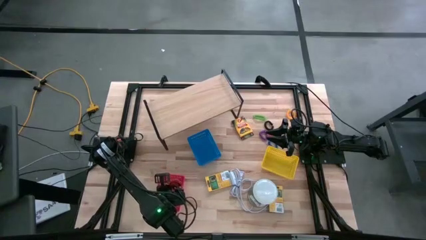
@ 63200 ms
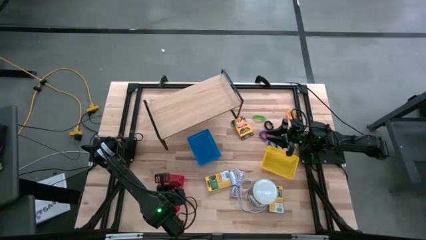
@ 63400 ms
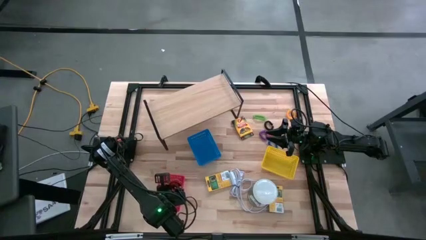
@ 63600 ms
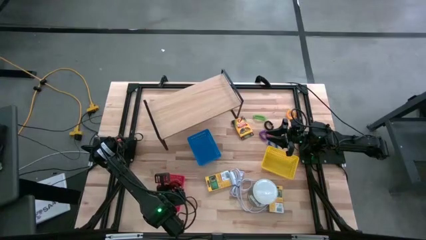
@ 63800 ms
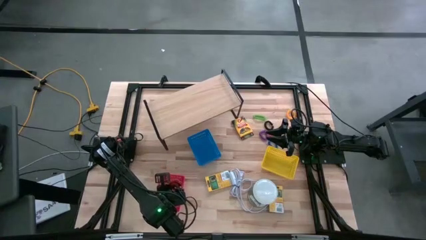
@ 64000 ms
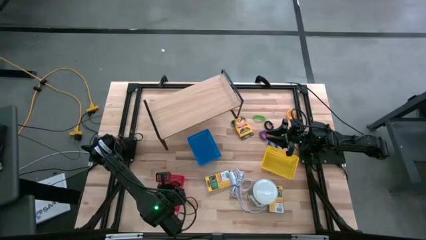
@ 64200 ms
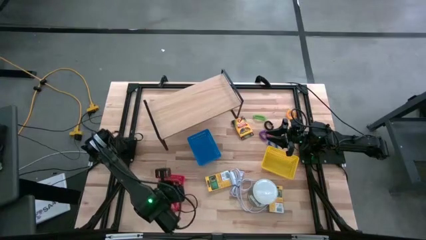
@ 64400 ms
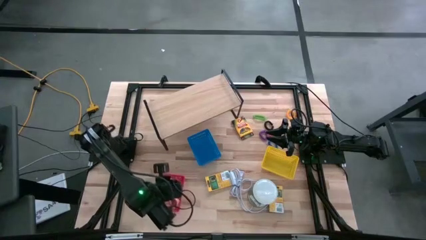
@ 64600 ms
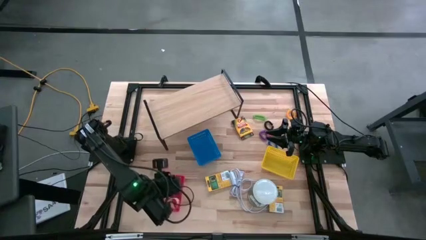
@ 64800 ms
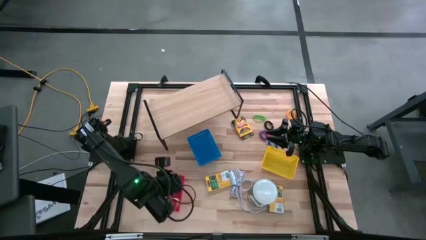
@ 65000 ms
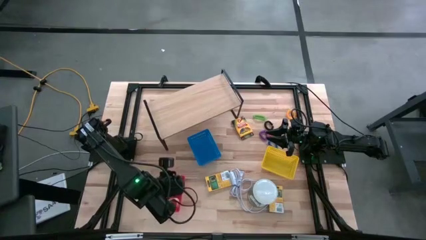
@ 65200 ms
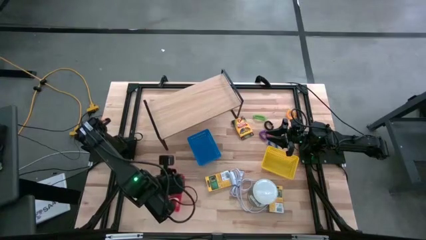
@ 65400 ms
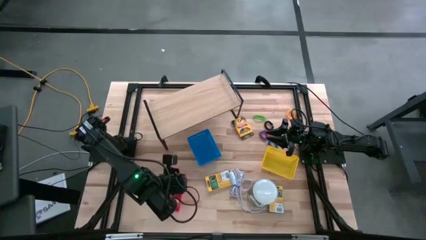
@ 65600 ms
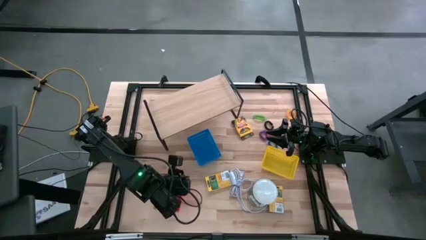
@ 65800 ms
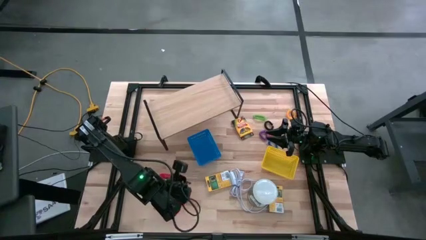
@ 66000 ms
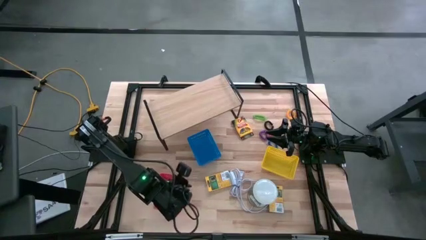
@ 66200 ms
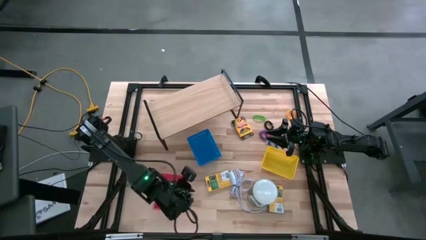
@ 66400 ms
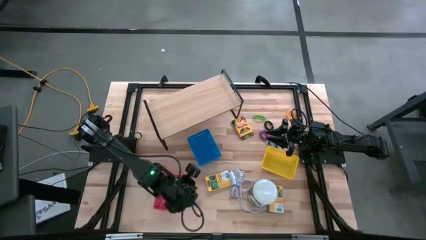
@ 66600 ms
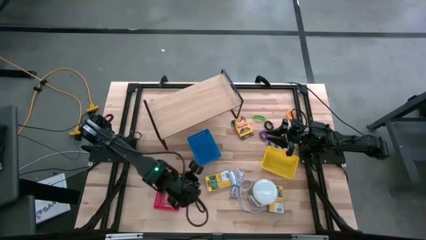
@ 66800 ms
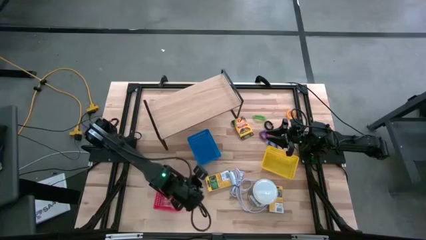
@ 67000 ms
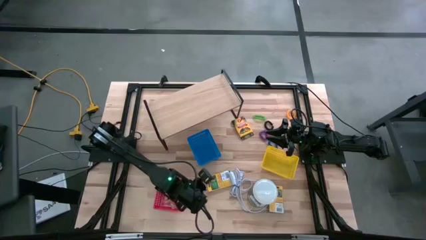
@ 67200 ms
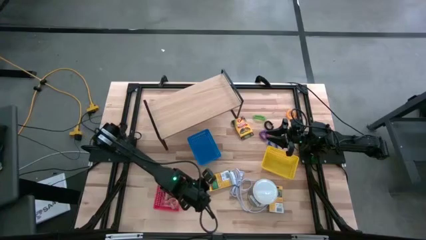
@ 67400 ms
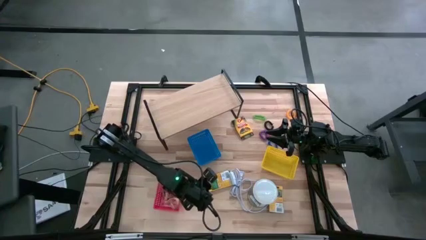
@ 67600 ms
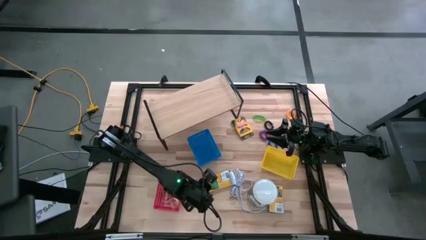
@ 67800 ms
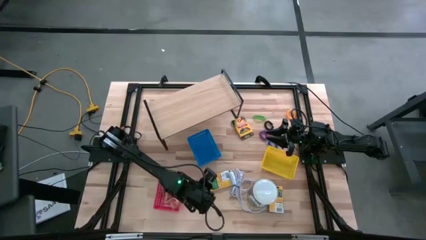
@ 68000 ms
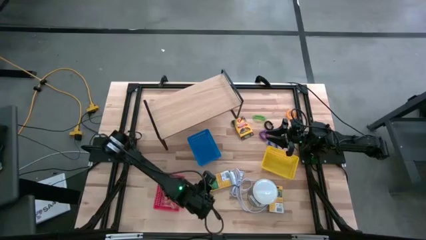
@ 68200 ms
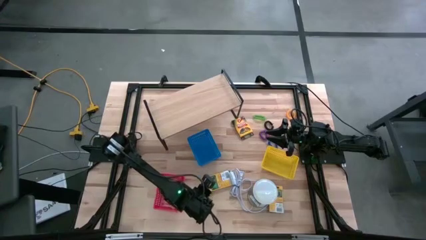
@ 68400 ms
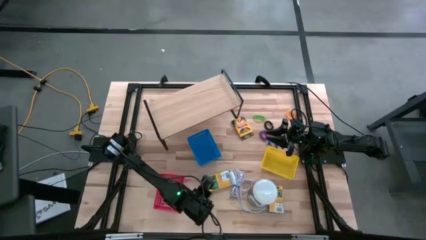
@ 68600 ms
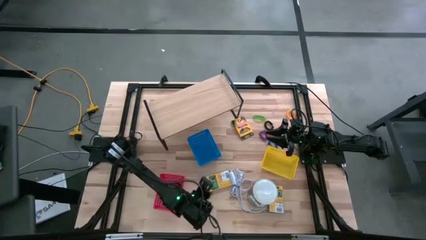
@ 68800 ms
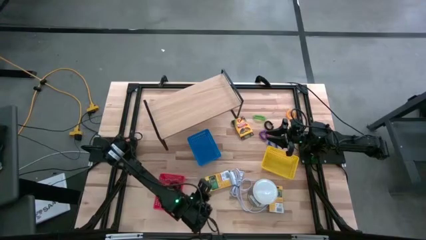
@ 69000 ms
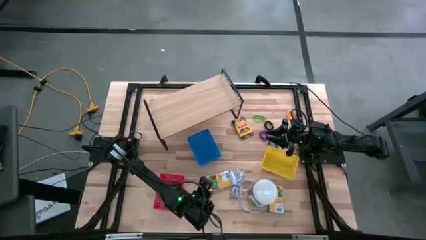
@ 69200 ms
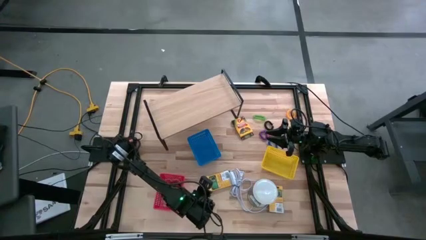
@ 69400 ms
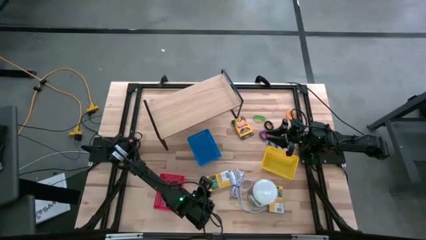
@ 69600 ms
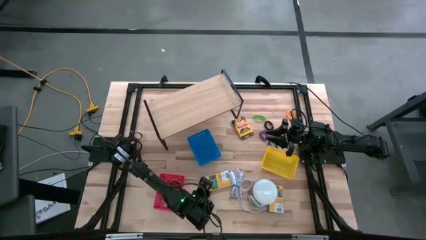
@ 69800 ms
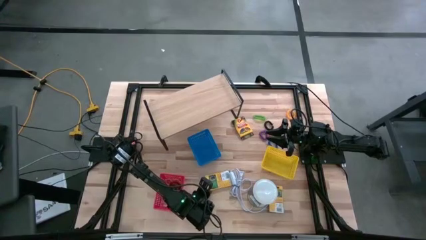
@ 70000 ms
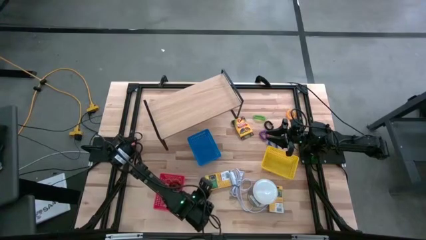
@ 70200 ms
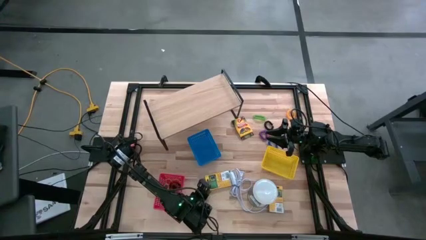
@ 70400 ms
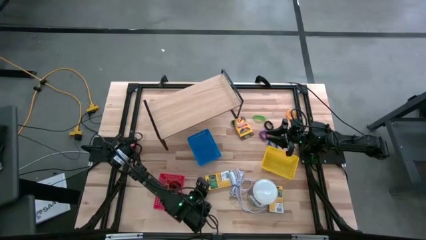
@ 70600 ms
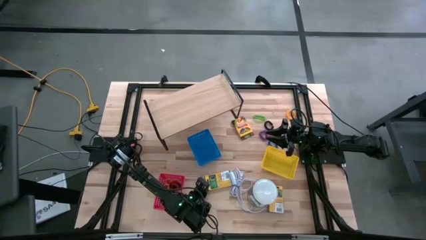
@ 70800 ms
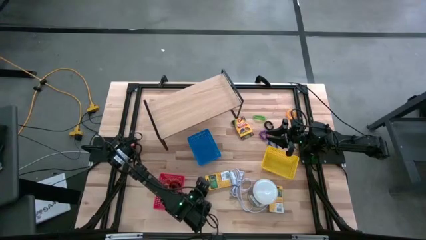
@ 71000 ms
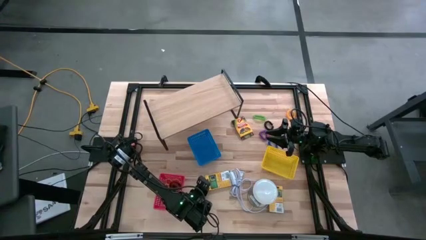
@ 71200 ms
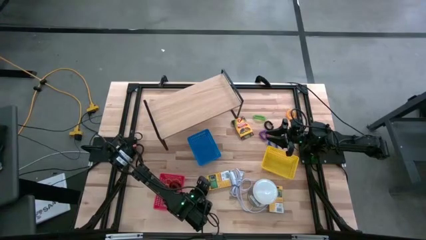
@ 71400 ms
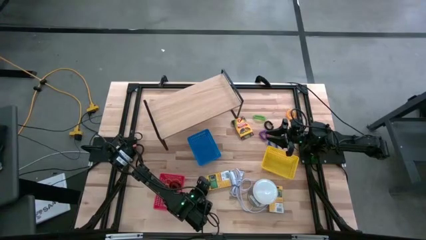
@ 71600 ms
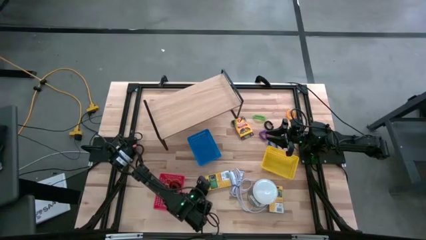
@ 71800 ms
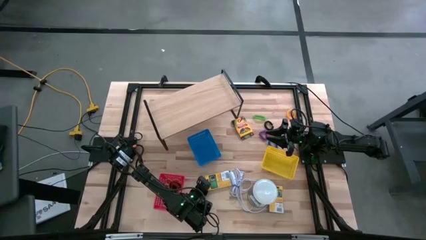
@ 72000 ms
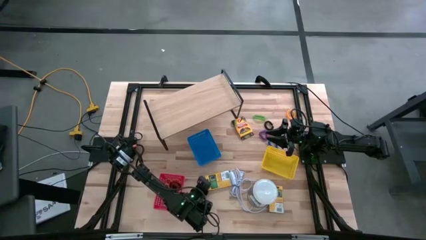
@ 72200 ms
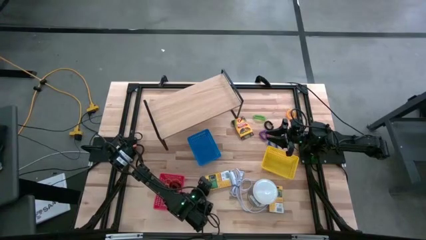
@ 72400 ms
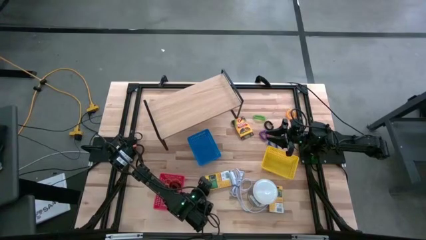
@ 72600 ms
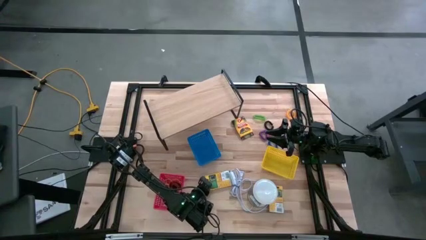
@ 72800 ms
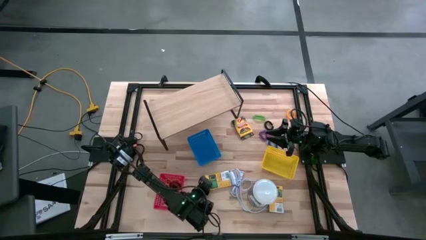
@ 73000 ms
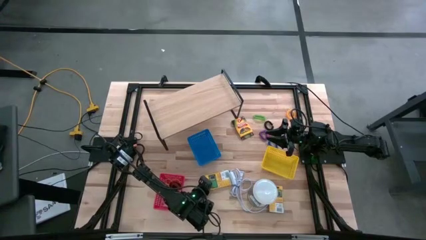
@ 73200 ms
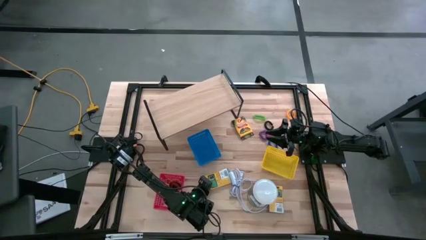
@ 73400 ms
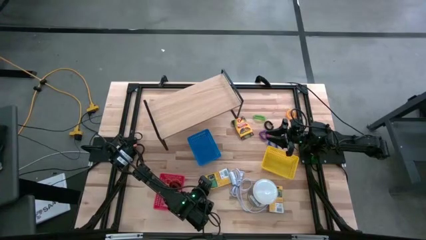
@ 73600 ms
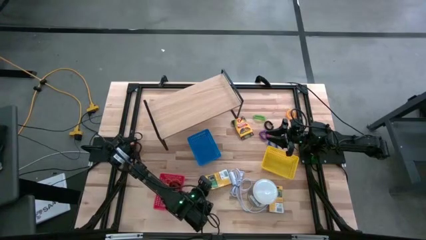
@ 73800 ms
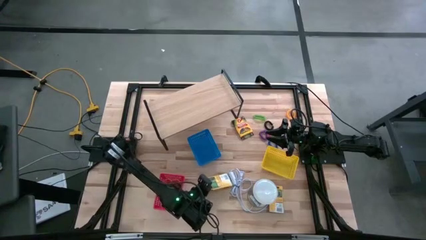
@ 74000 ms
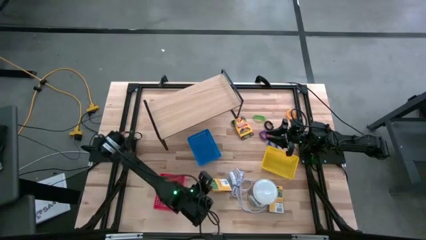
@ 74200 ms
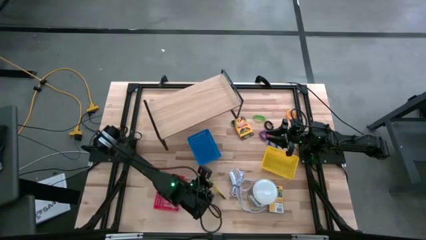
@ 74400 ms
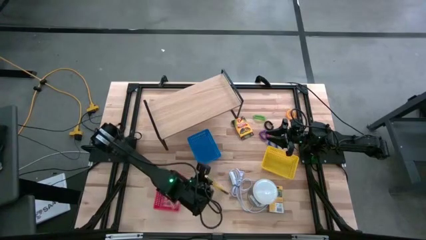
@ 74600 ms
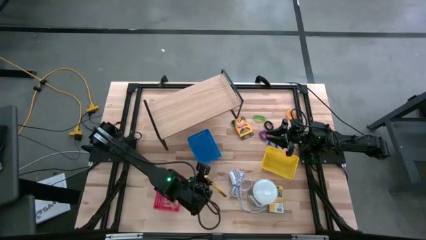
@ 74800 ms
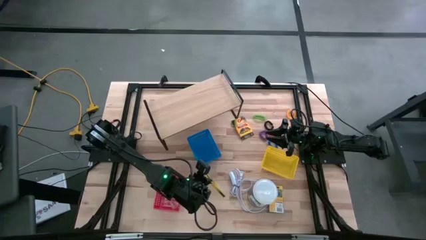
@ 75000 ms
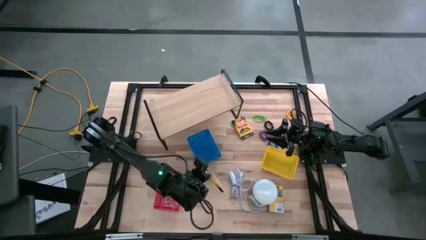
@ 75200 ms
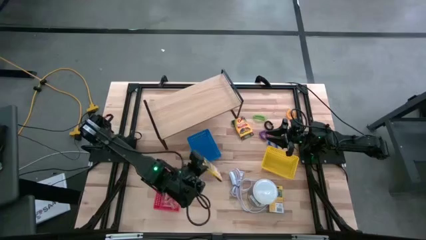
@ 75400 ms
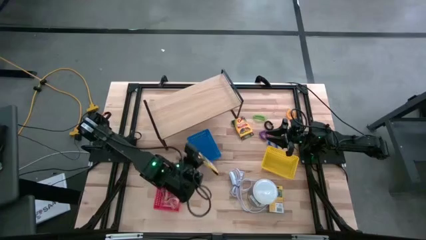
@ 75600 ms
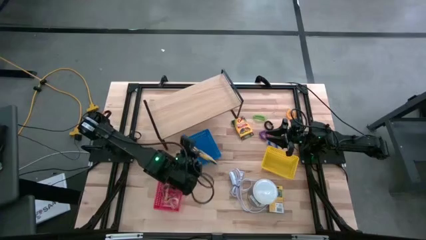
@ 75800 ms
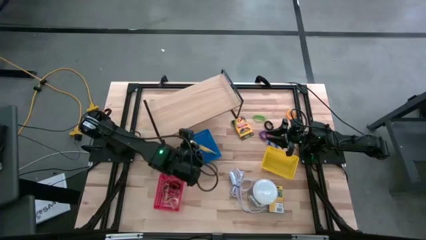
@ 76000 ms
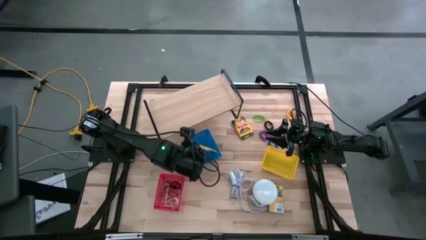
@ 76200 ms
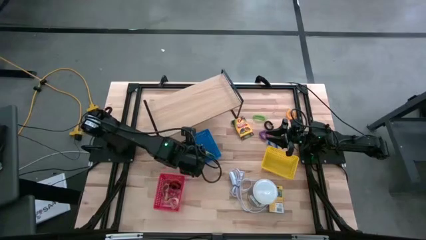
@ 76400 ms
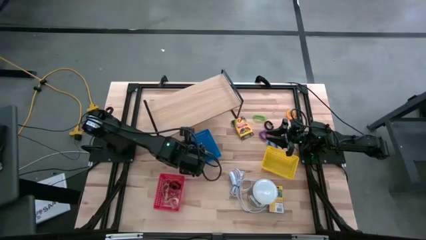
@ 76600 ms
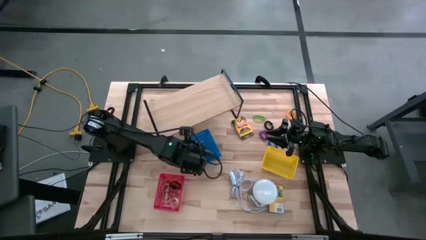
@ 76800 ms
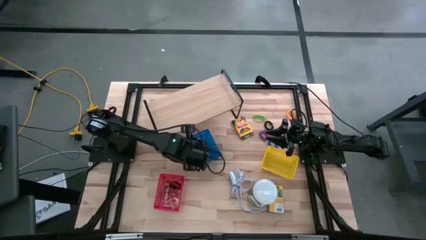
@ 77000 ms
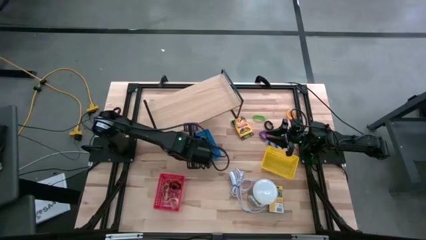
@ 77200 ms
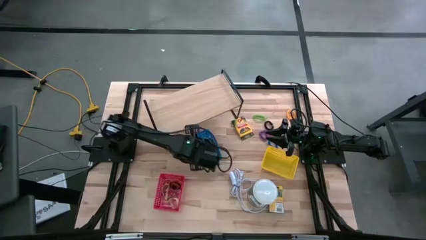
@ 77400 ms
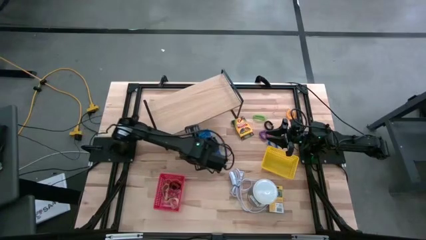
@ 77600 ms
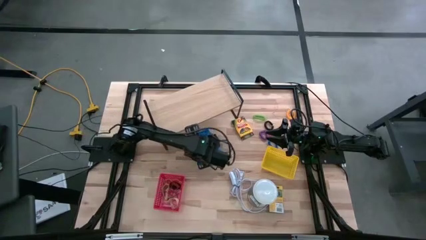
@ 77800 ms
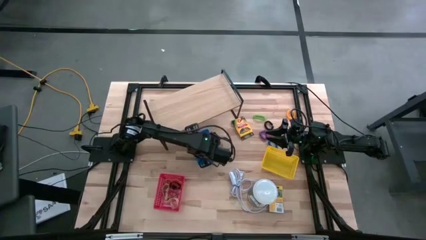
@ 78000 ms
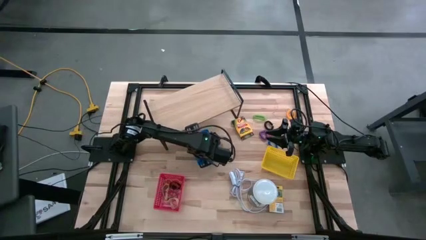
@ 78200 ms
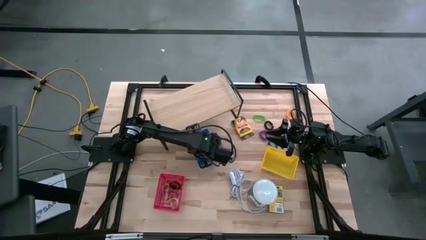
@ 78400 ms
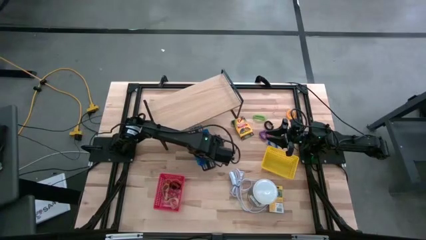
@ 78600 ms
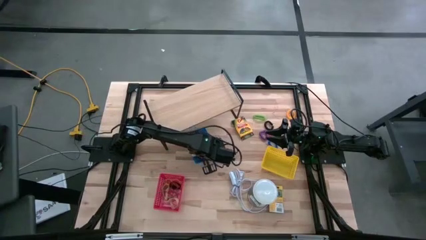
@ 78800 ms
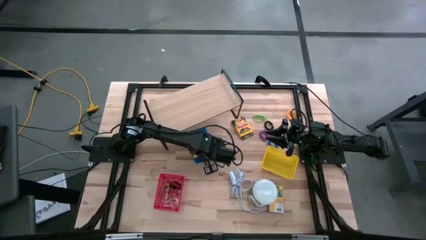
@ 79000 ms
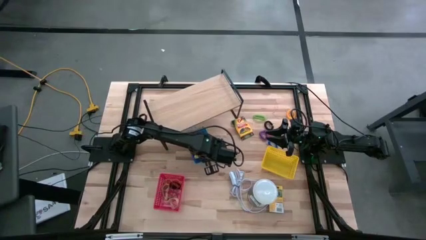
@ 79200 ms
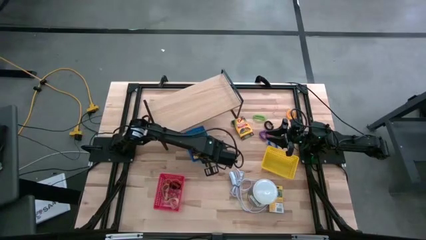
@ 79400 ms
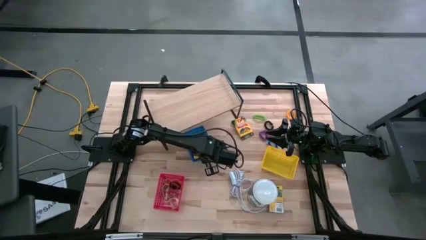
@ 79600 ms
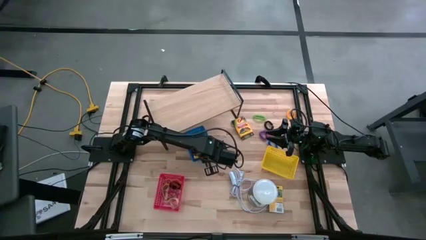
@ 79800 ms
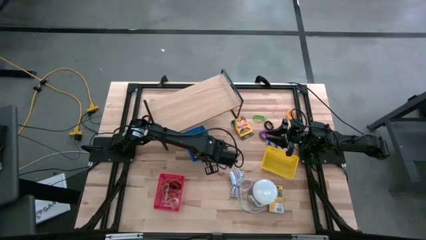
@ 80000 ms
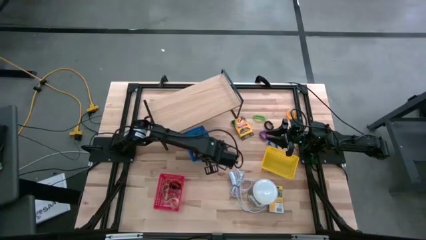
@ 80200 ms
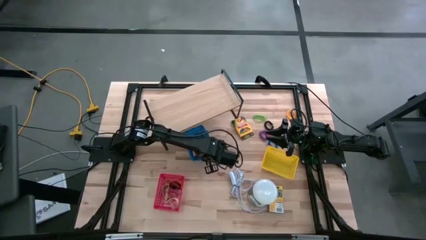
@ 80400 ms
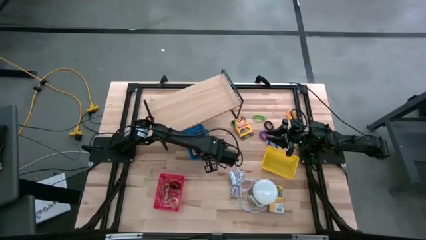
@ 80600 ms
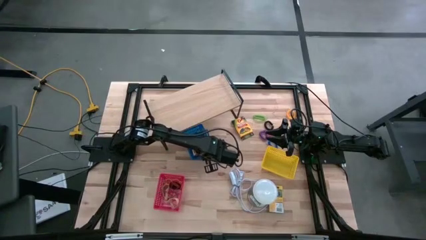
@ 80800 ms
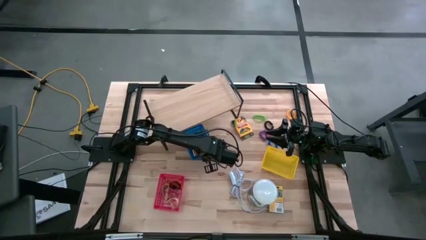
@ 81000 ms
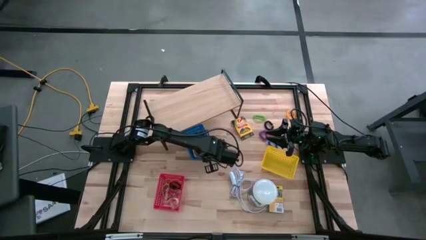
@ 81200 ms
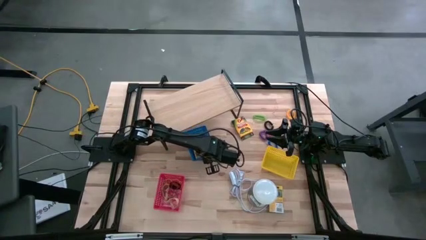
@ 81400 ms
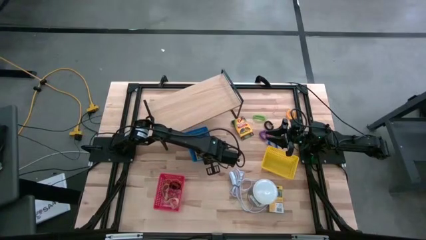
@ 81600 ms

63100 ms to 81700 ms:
Task: Pick & Place Office Desk Supplies
Put the yellow pack of crayon into the blue bin
